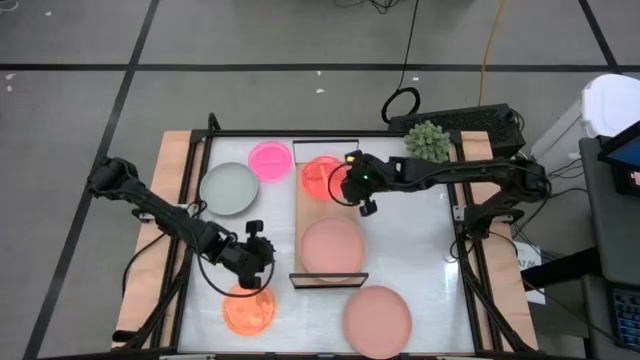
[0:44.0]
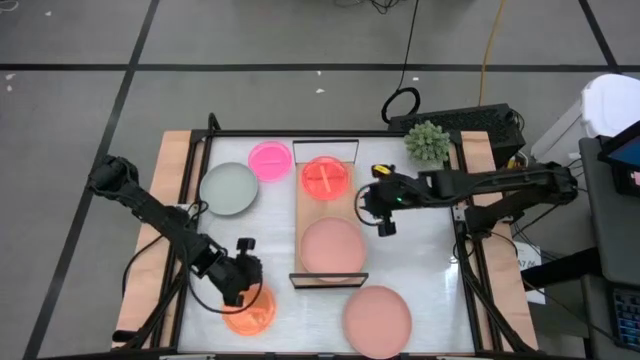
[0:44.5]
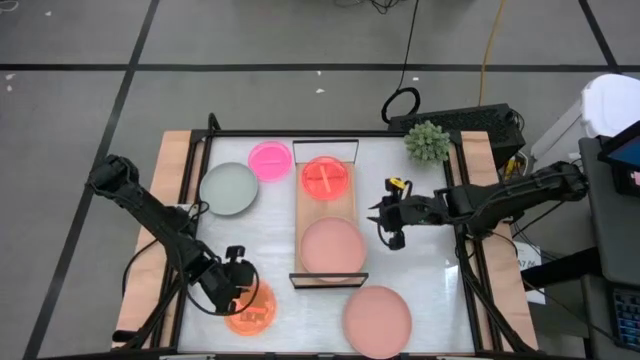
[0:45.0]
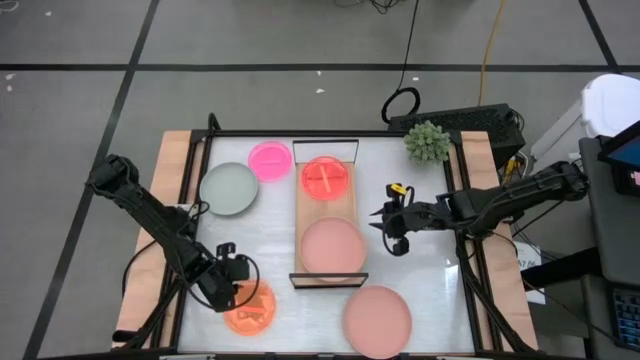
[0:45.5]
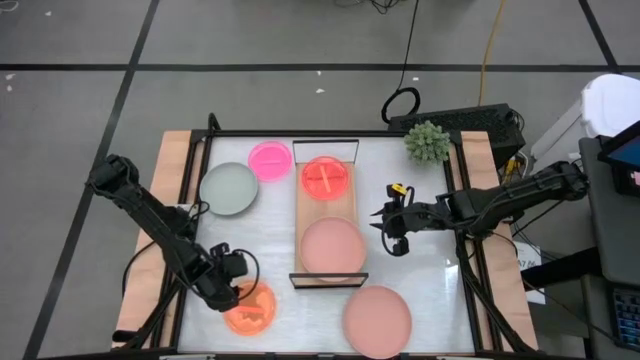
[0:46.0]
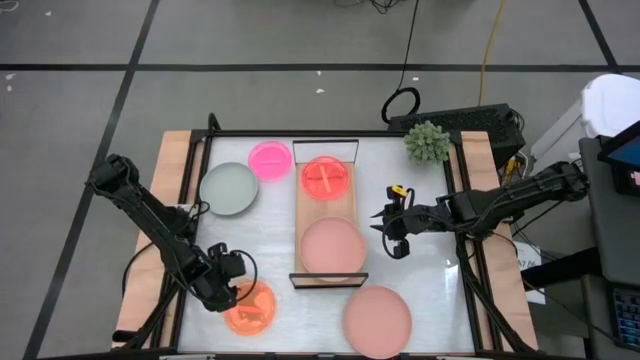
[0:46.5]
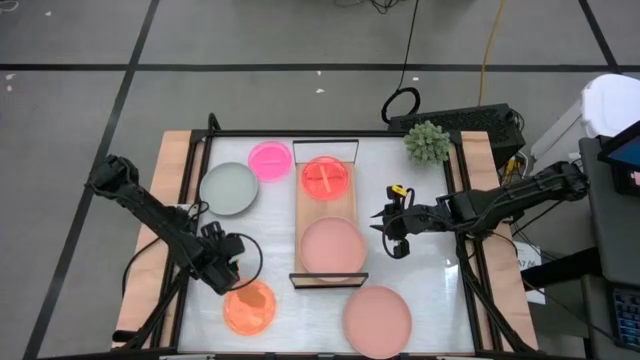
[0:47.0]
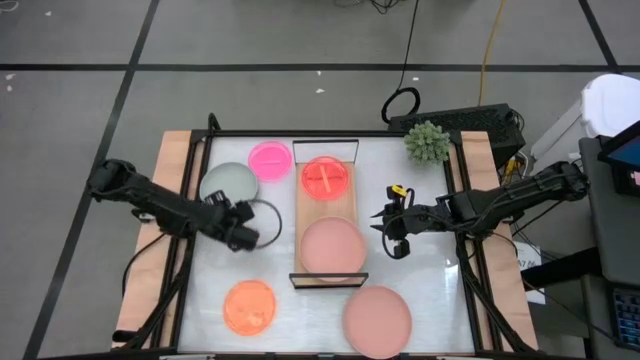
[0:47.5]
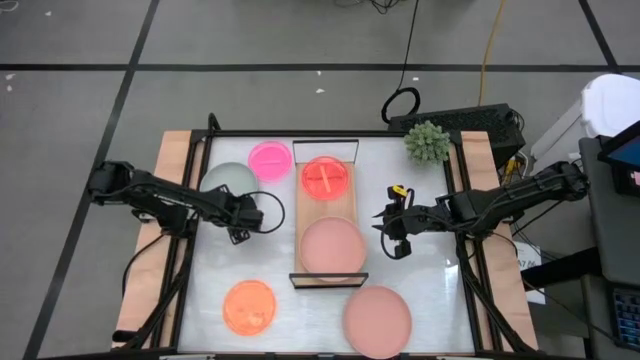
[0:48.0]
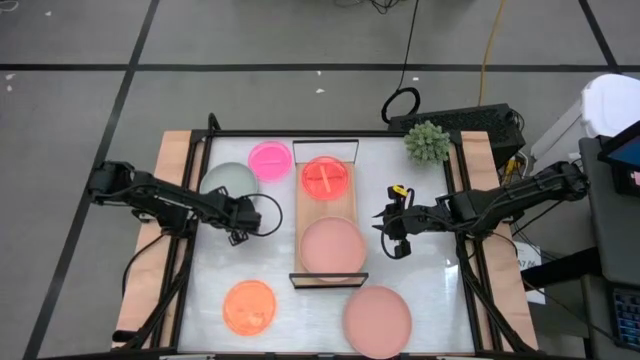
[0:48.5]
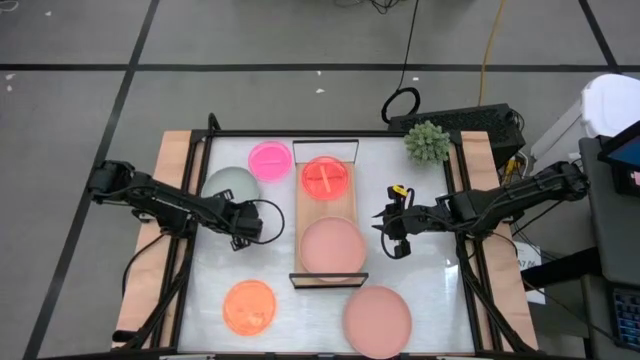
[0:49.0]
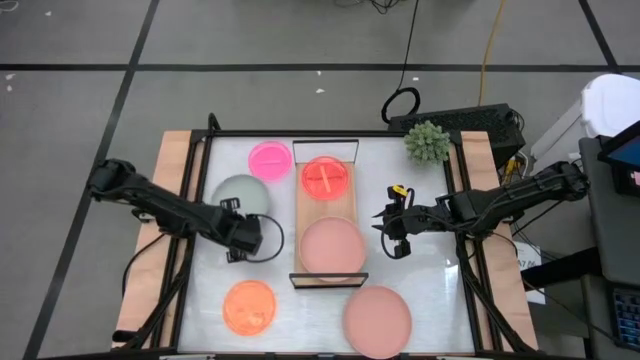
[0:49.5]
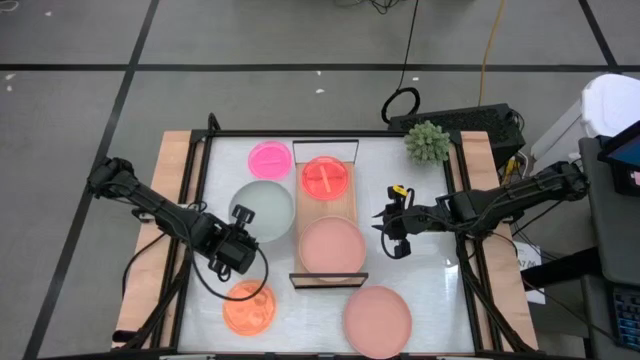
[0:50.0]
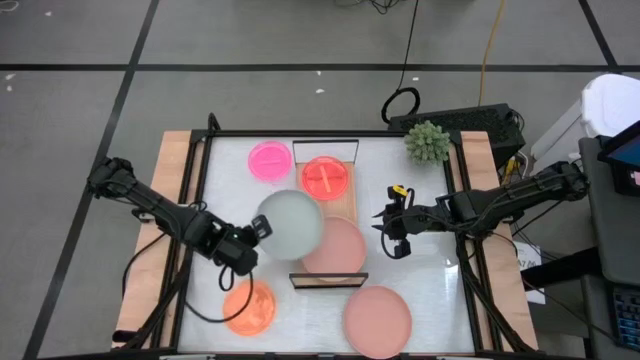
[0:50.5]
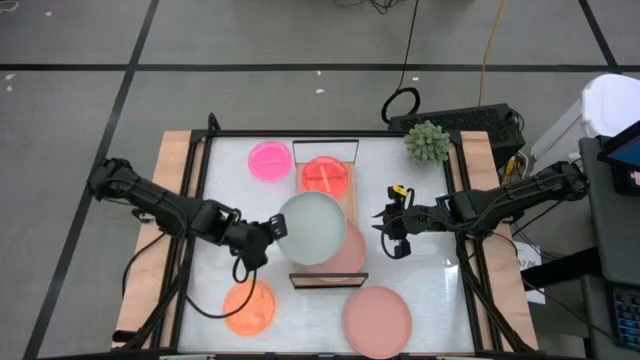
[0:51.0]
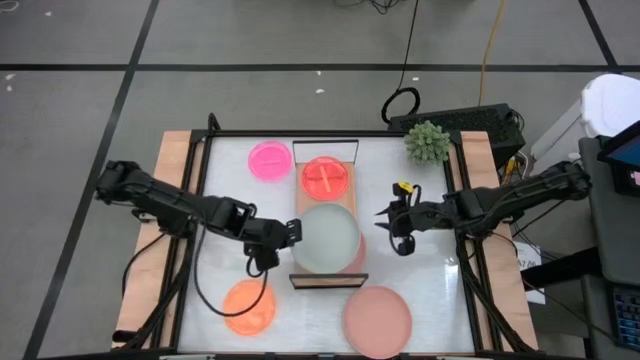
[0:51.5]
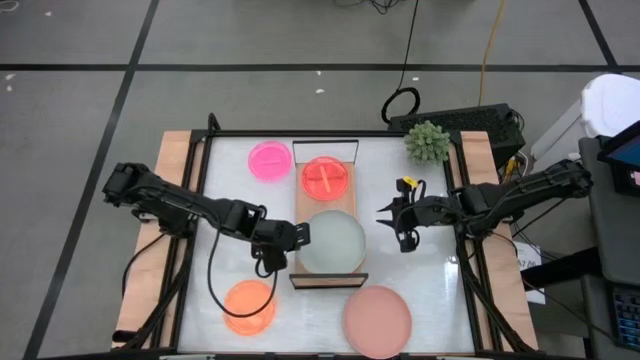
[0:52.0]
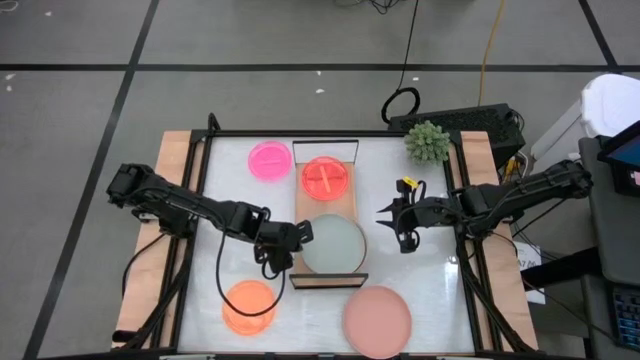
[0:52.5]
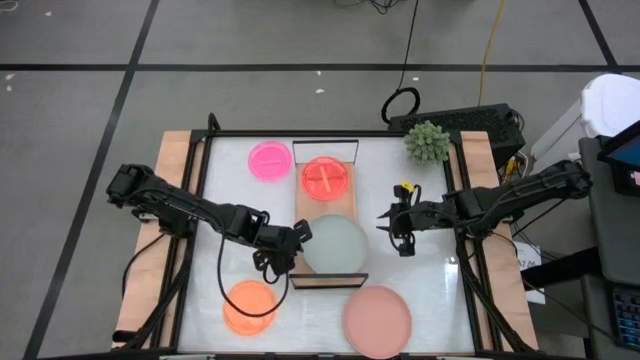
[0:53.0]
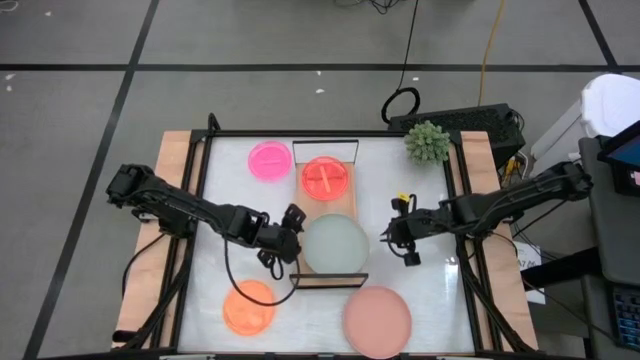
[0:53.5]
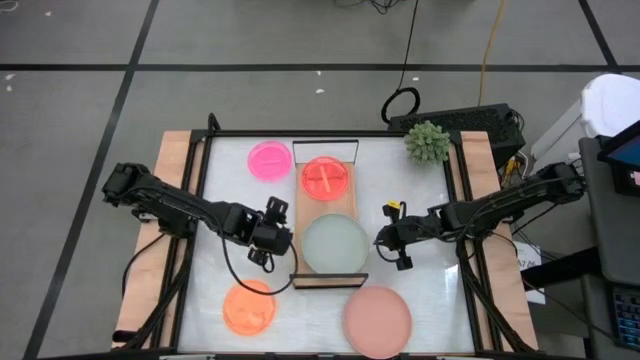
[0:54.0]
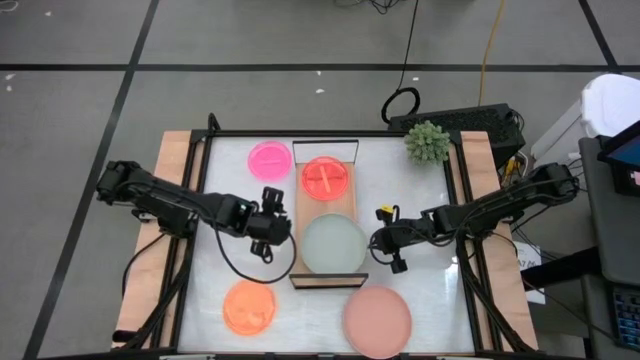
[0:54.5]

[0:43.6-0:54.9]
Task: Place and stack plates onto a shelf
Stack the gray plate on top of the pink plate on the shelf

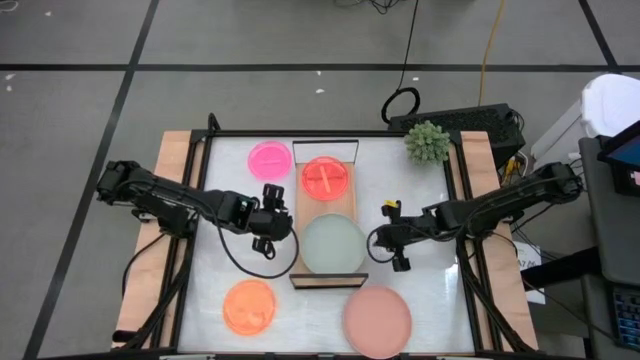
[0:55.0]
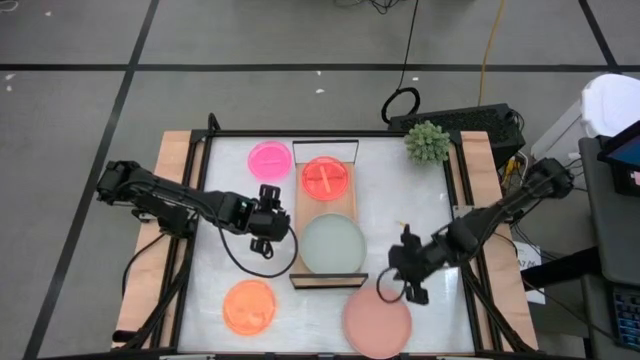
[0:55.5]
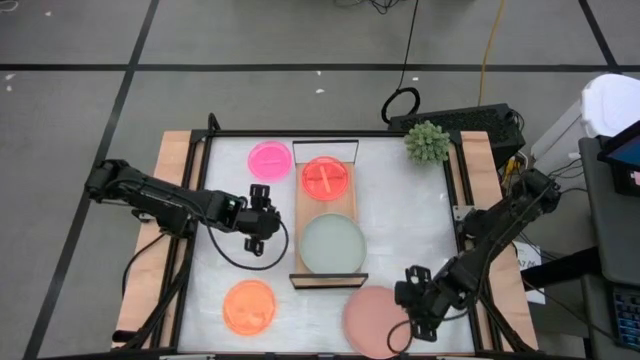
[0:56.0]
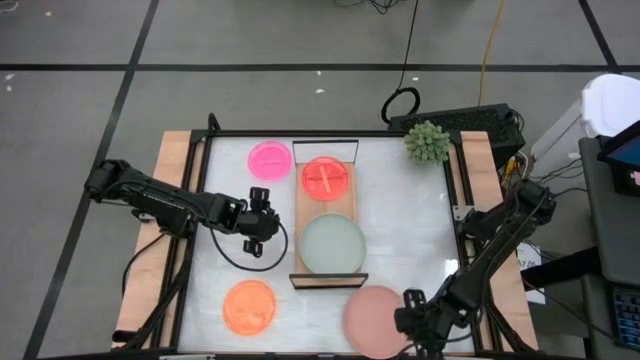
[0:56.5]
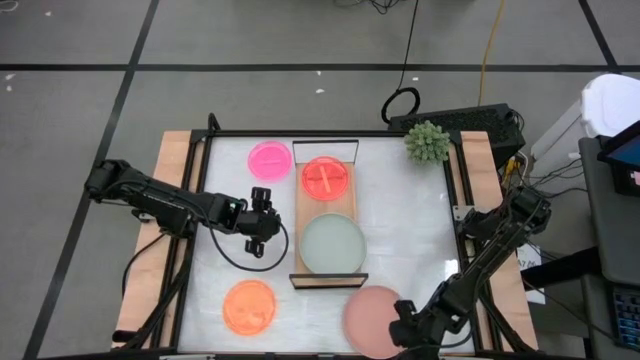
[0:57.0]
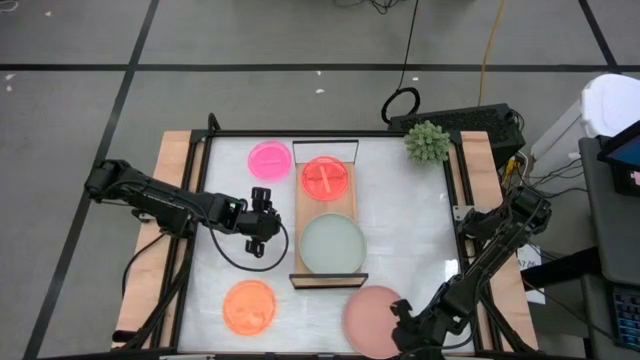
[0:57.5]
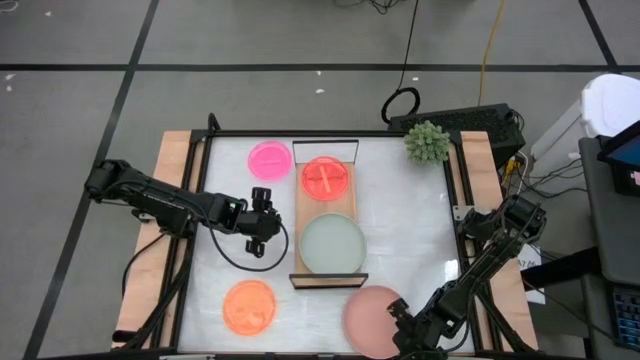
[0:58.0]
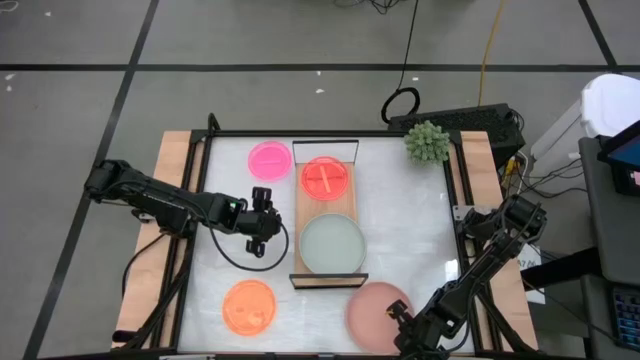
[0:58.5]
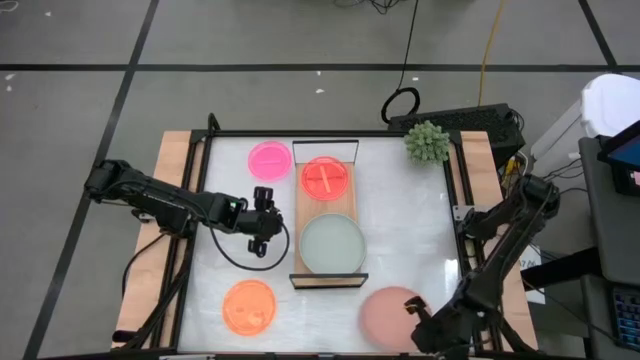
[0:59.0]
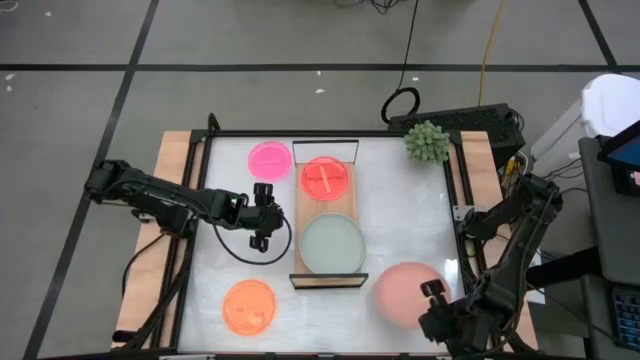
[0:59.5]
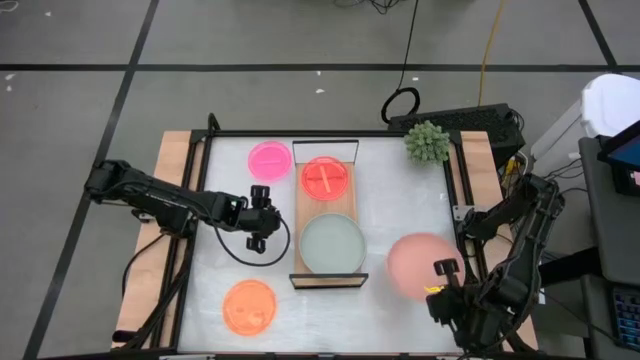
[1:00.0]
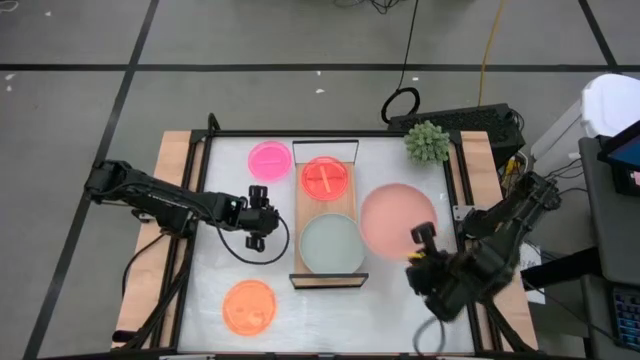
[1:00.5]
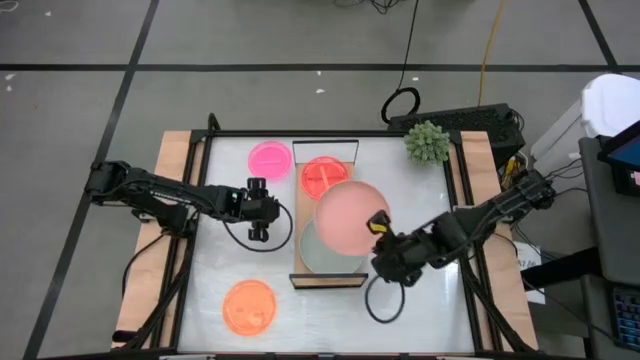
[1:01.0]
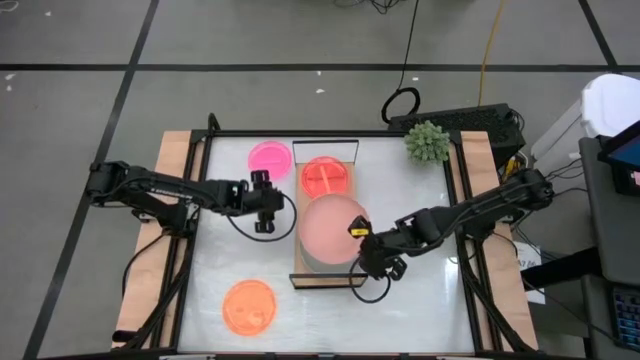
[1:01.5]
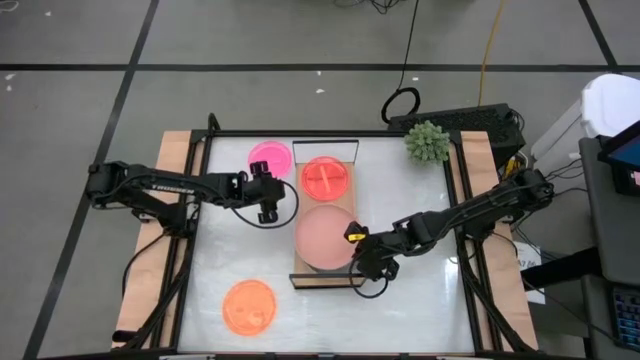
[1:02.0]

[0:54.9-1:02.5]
Stack the pink plate on top of the gray plate on the shelf

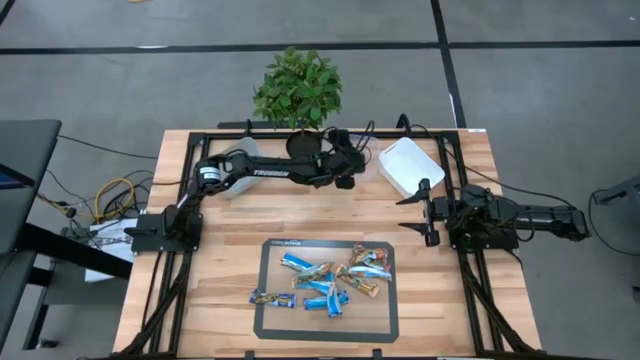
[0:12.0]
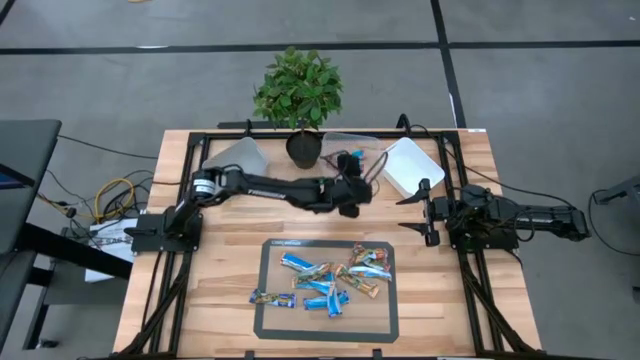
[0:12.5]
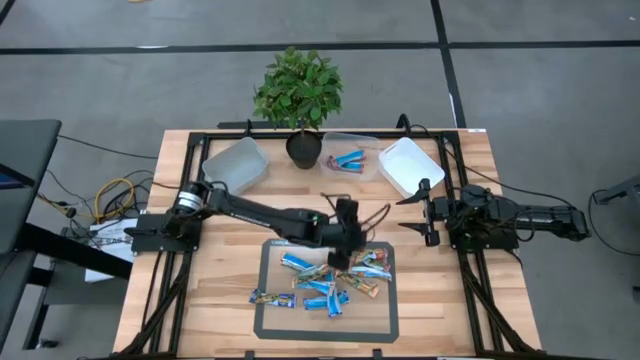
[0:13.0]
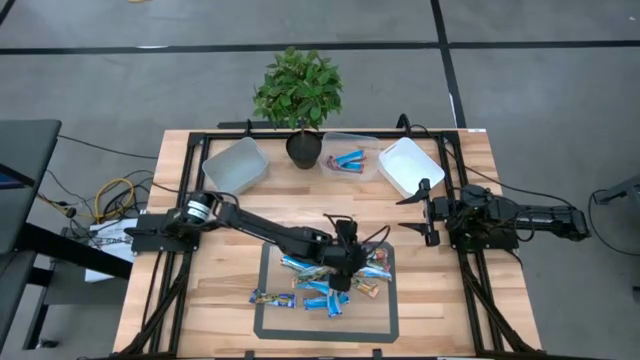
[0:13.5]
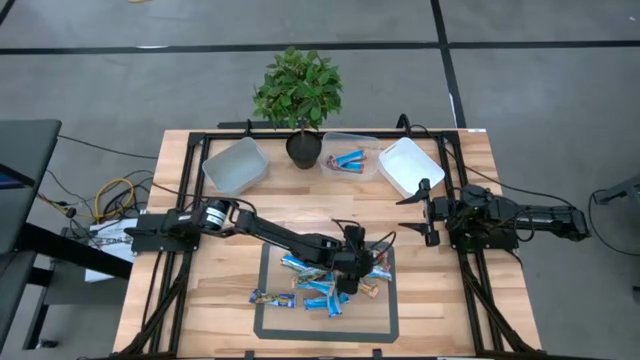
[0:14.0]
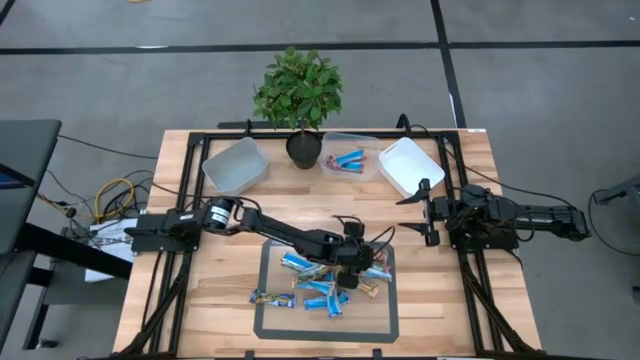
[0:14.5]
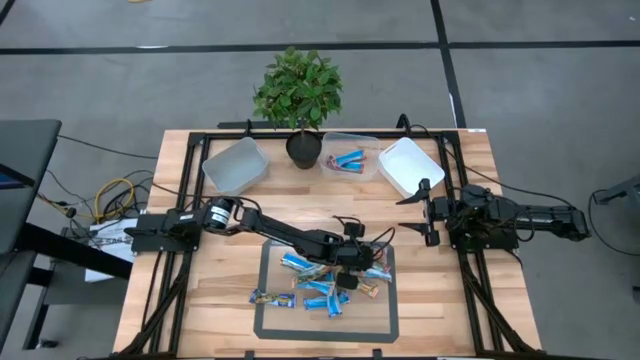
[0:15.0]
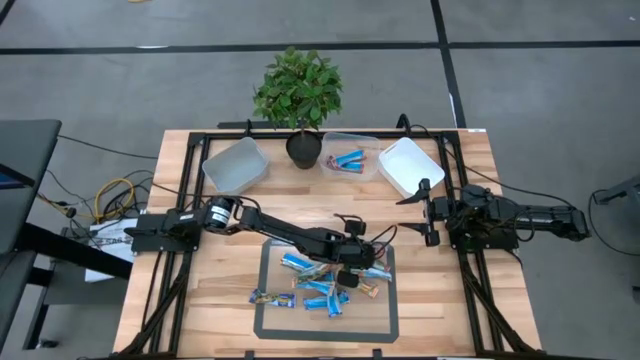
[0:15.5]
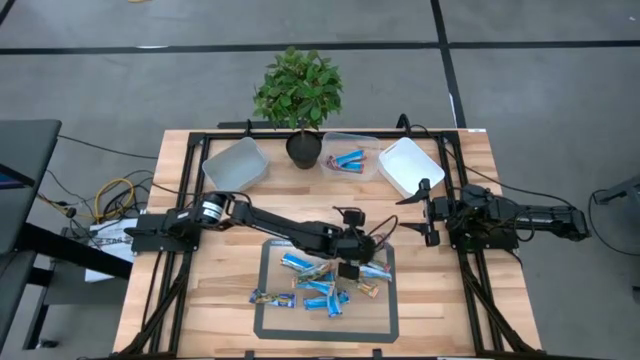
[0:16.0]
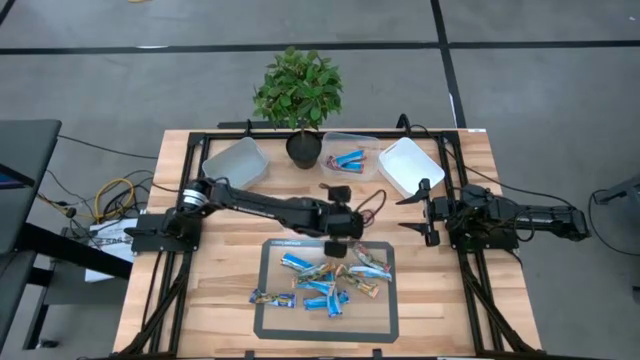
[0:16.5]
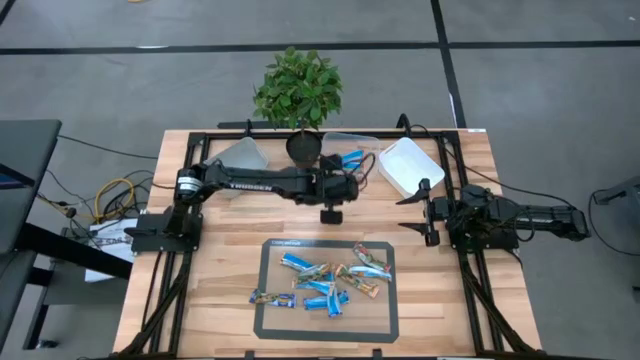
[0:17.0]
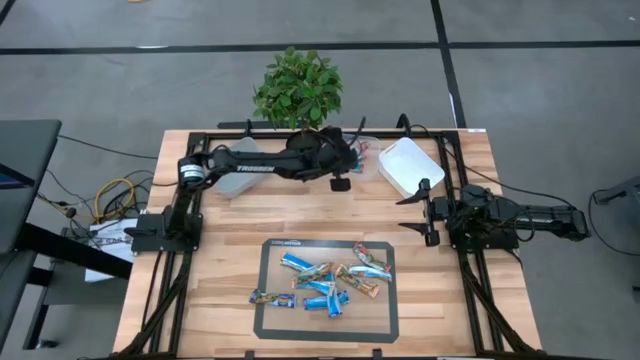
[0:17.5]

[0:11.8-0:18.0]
Task: Pick and place Granola Bars by type
Put the red granola bar into the transparent bin
